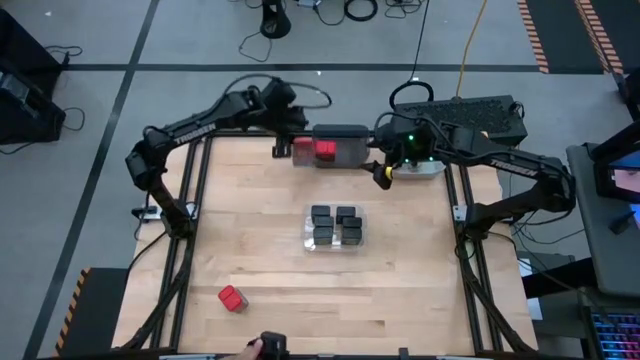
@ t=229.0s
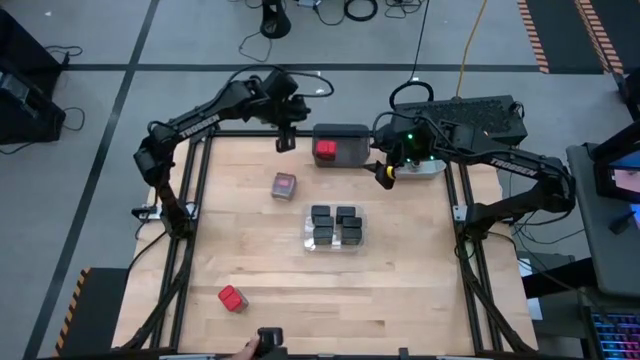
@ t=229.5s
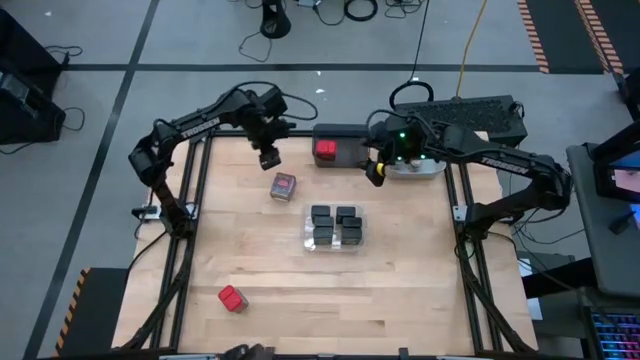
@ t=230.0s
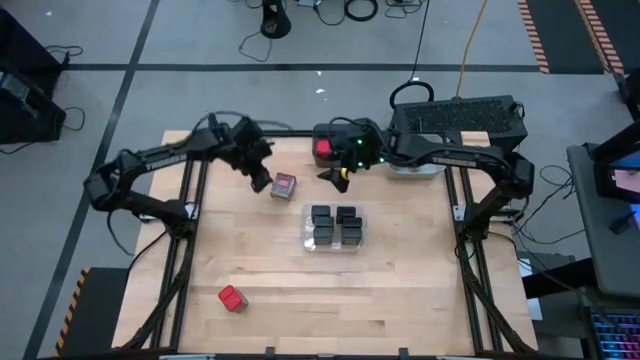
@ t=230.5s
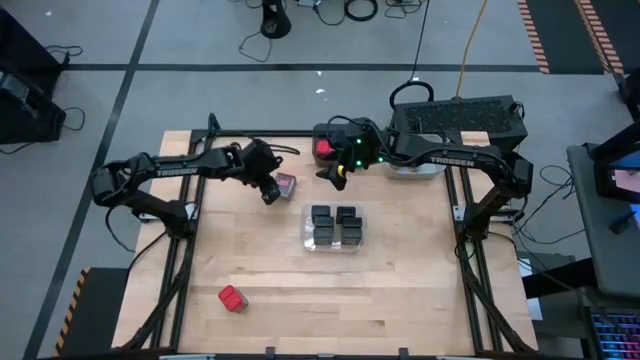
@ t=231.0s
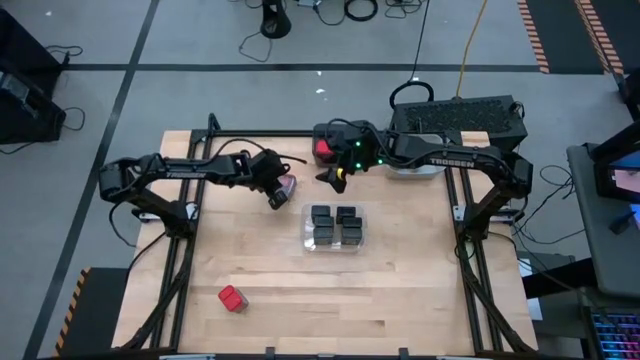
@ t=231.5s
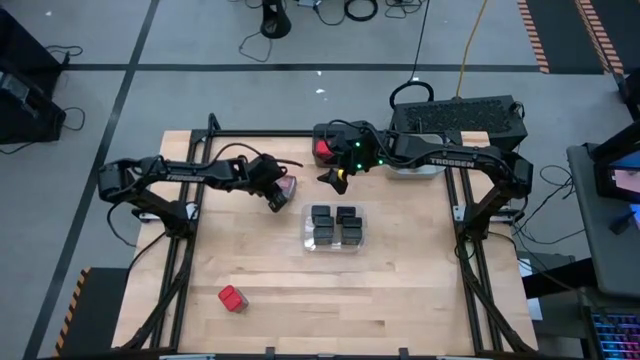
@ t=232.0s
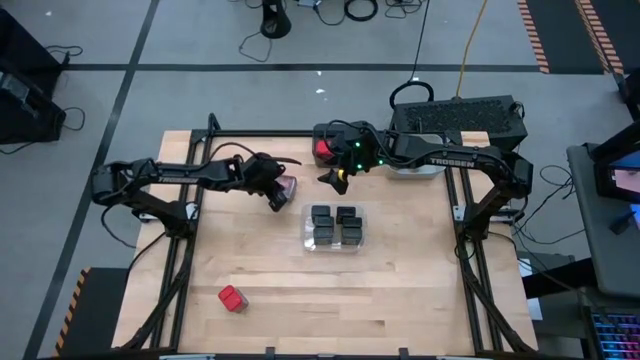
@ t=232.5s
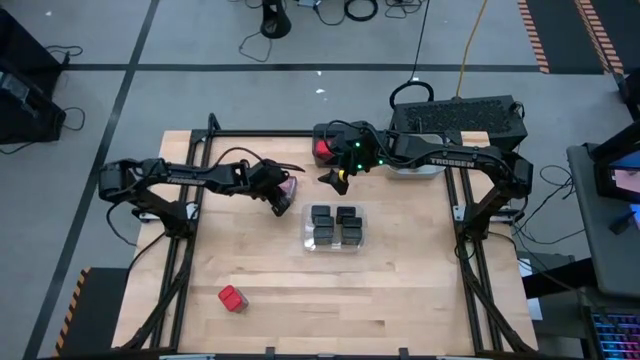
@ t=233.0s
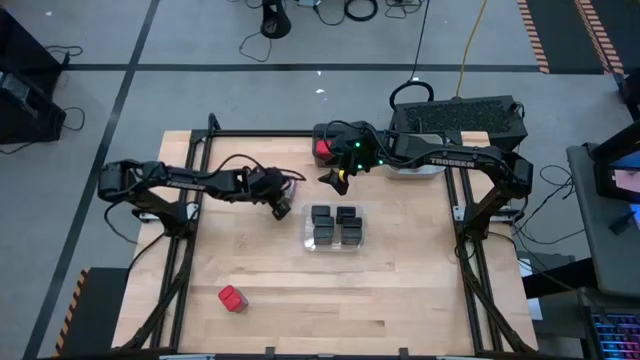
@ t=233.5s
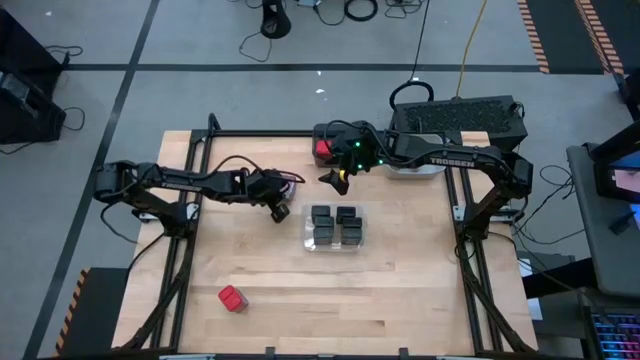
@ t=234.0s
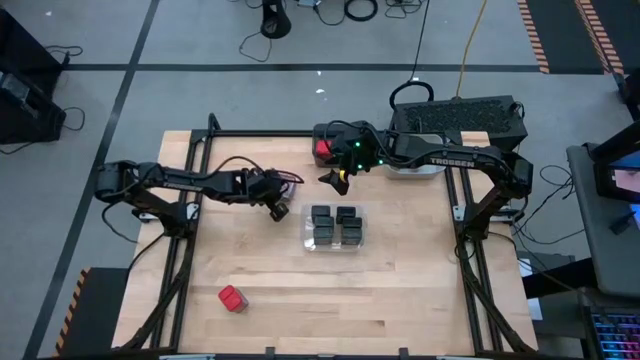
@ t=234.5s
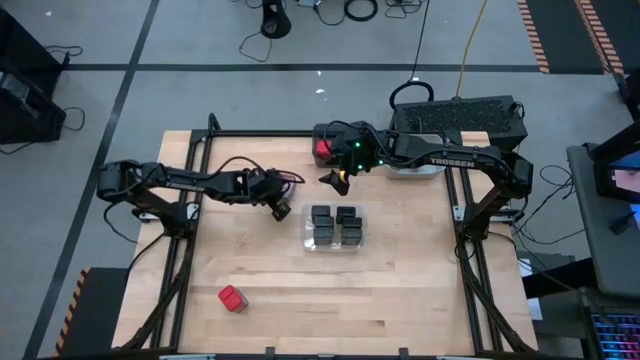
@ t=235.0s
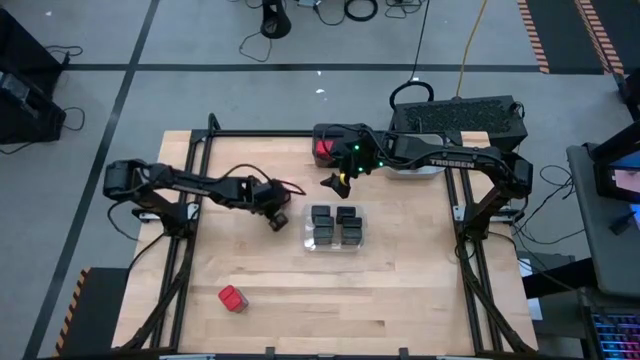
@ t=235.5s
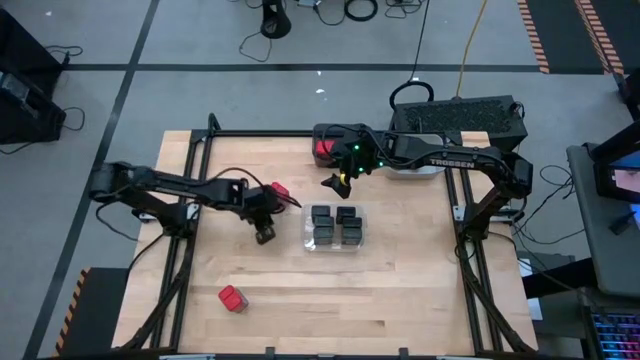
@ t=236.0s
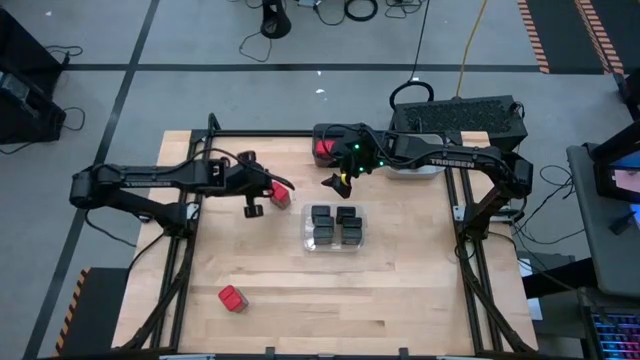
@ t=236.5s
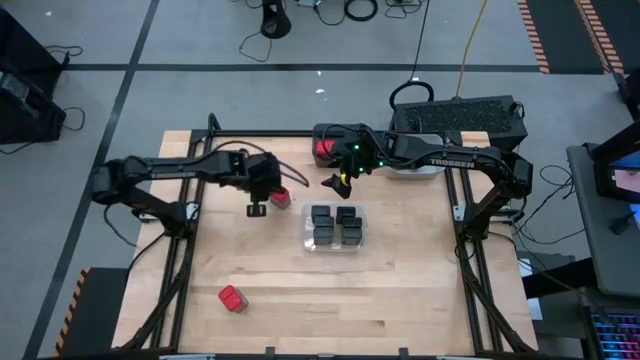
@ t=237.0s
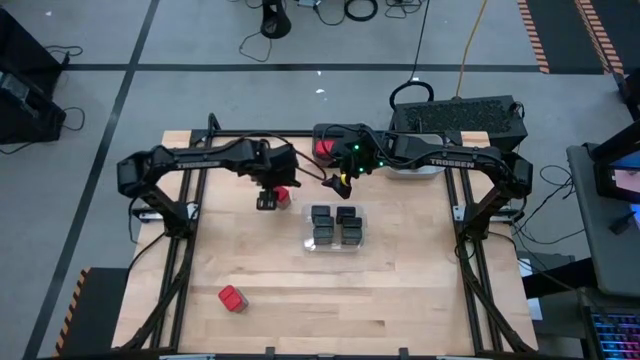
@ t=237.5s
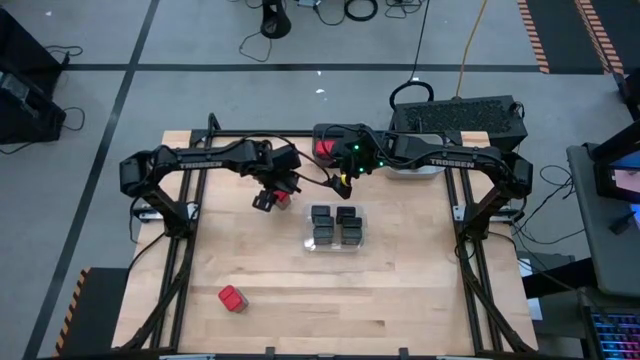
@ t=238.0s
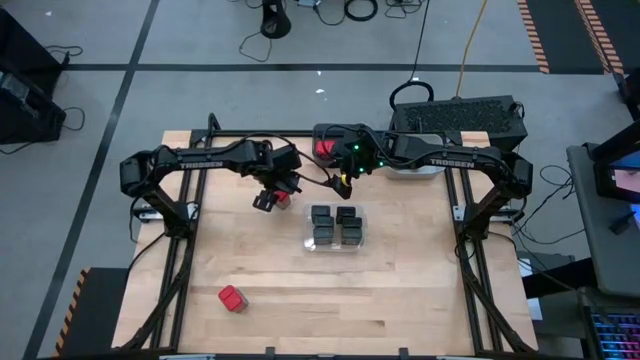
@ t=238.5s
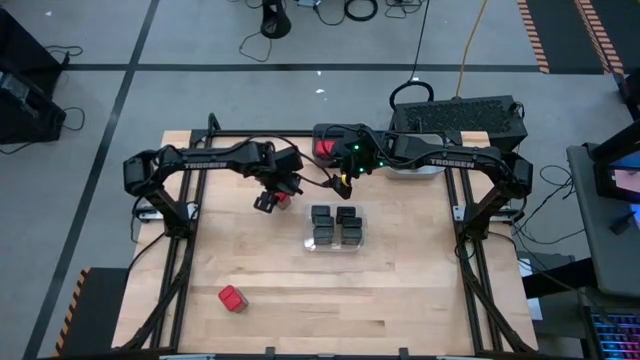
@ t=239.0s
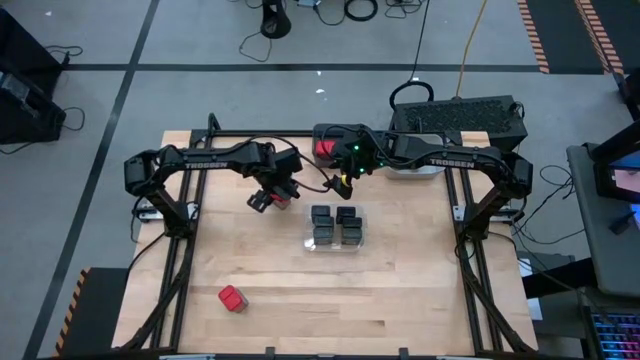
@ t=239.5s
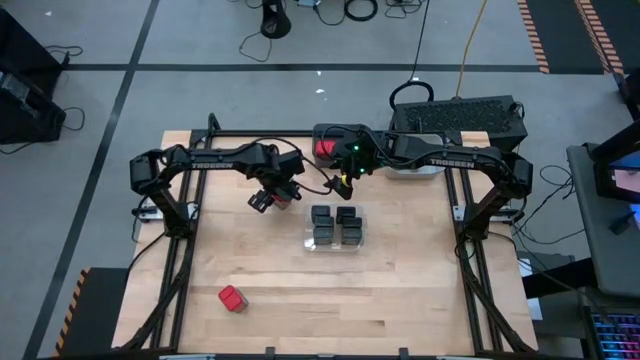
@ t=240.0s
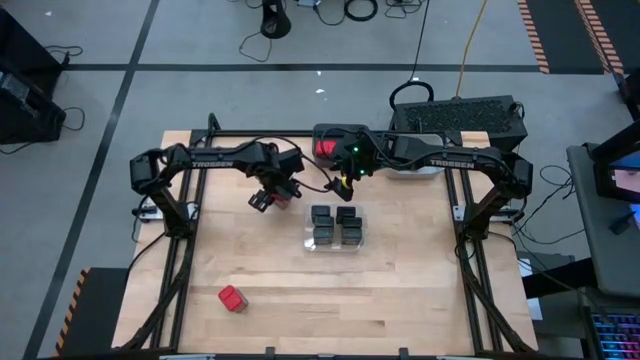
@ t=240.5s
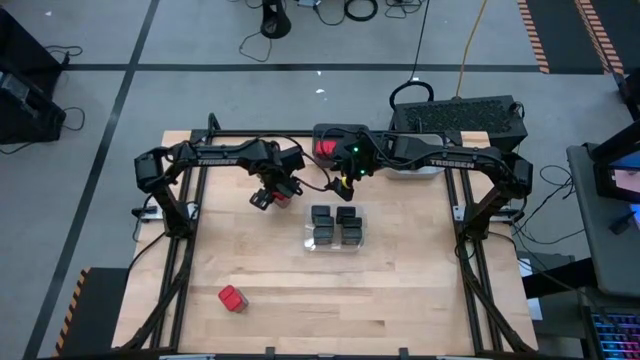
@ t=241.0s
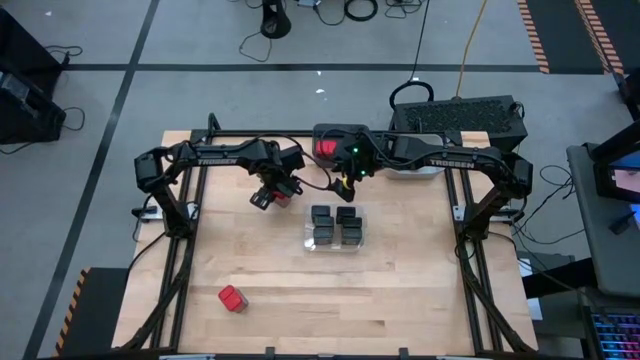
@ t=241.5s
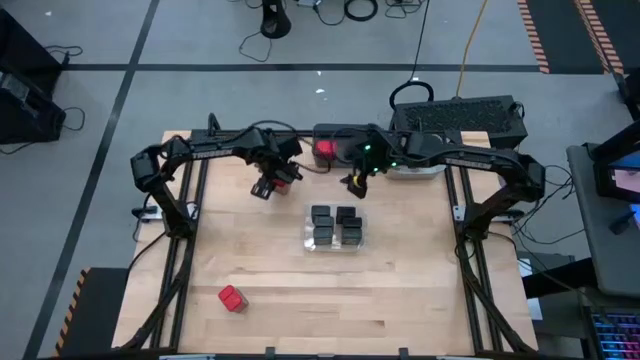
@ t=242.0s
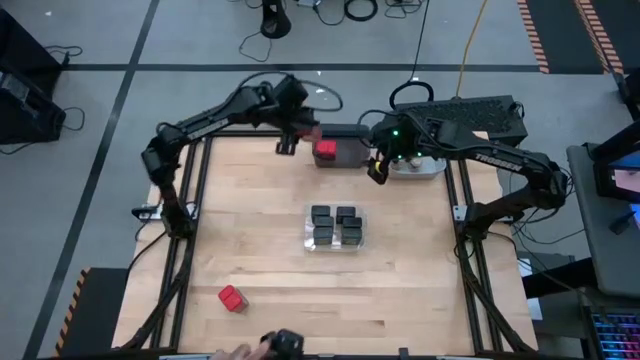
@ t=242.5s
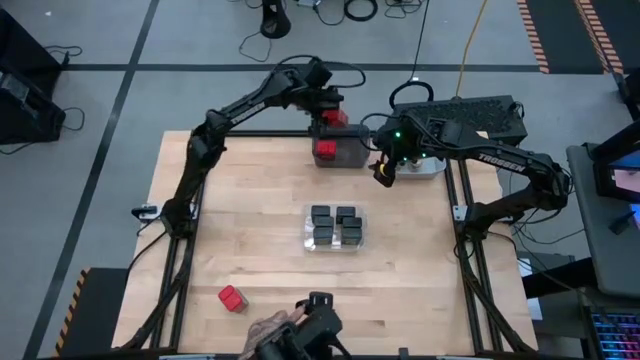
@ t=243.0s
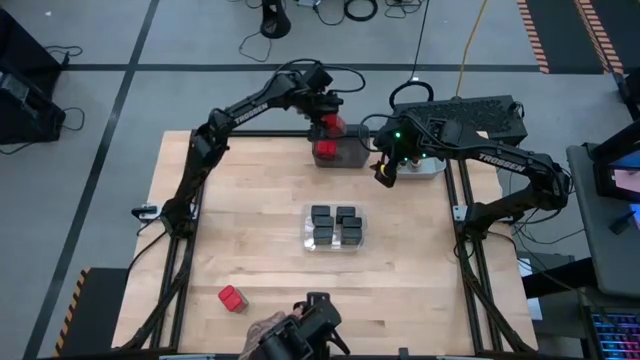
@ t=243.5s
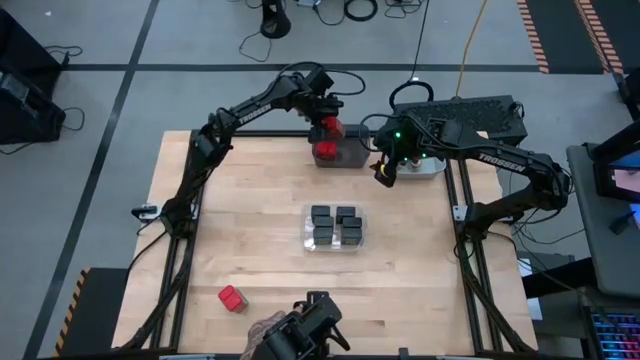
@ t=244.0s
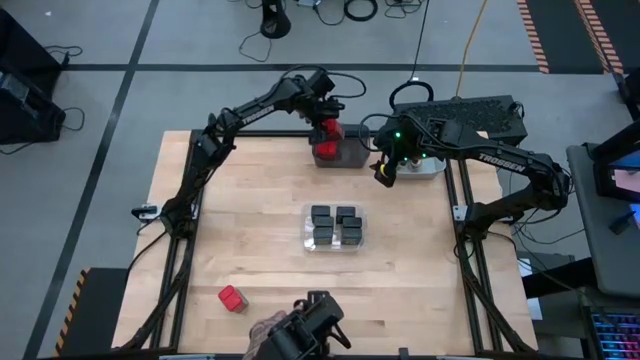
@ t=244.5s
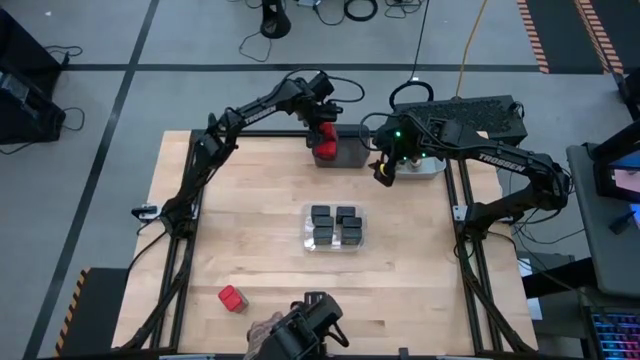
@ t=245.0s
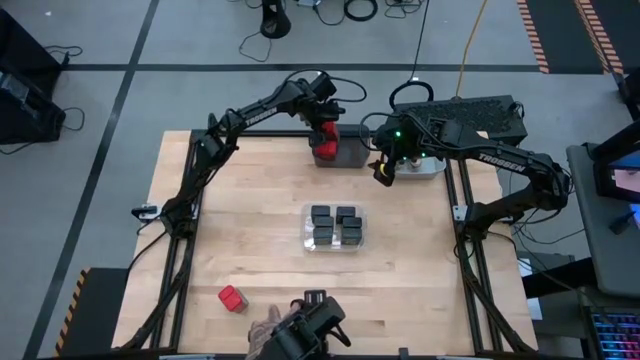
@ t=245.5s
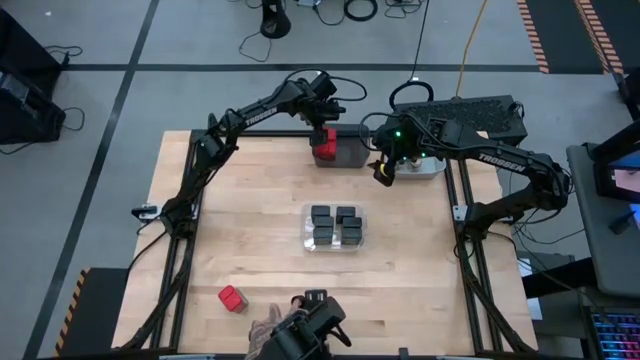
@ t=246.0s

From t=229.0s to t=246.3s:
Task: Sort spices by type
Put the red seasoning can into the black bin

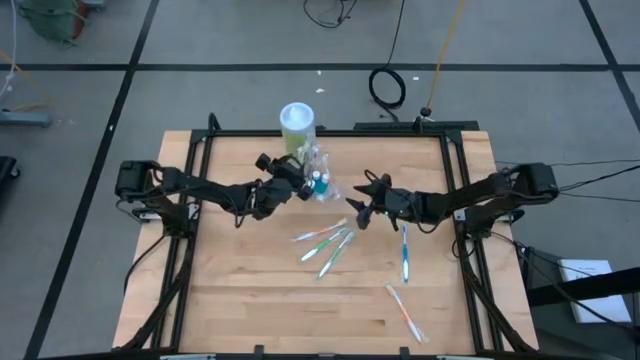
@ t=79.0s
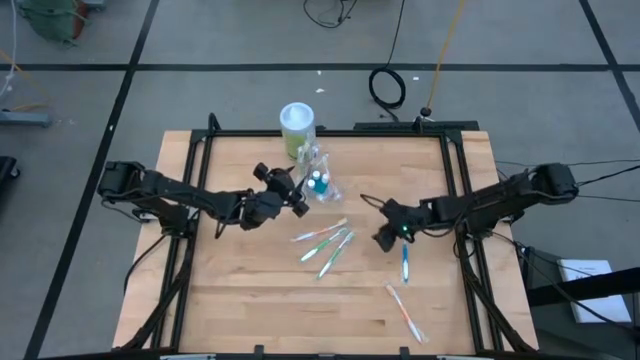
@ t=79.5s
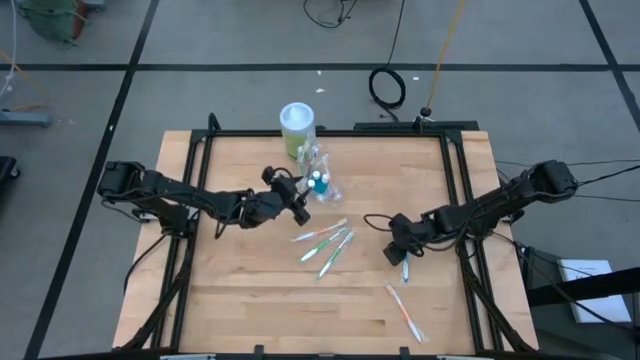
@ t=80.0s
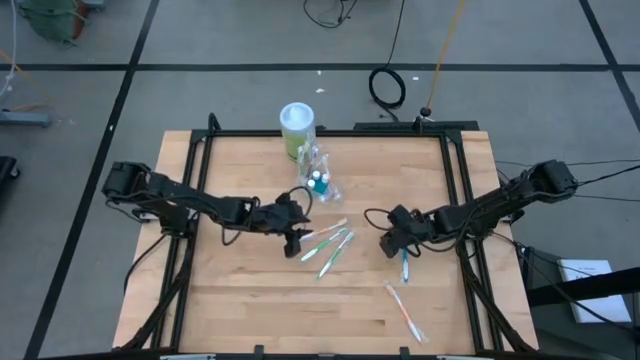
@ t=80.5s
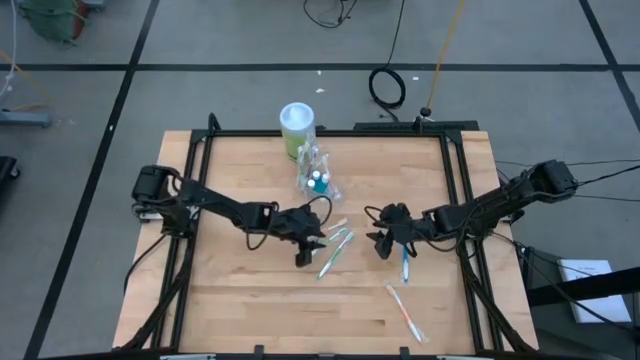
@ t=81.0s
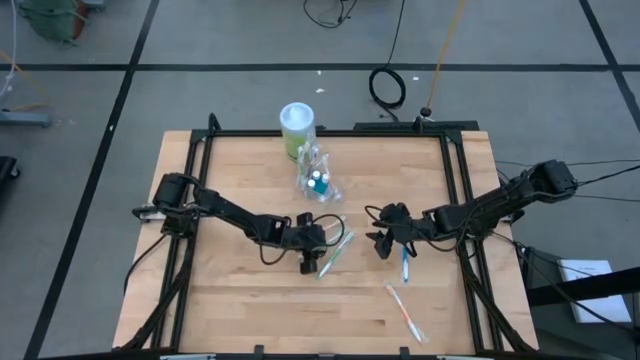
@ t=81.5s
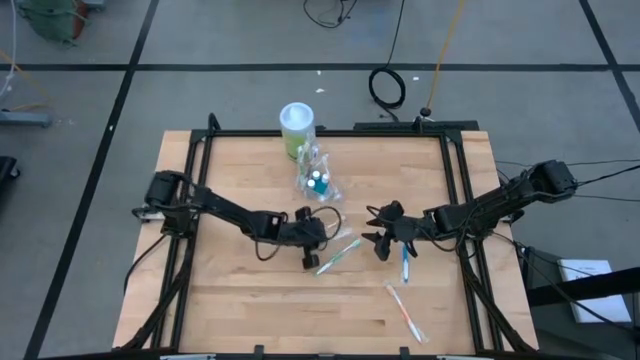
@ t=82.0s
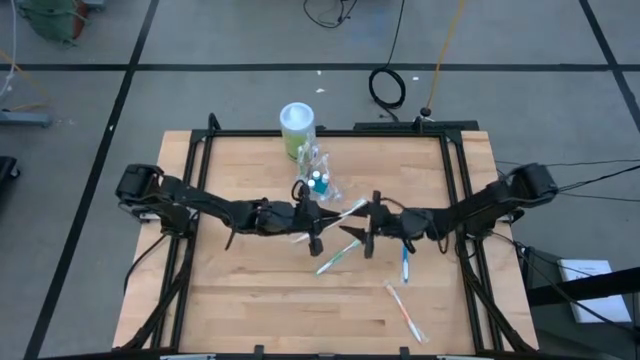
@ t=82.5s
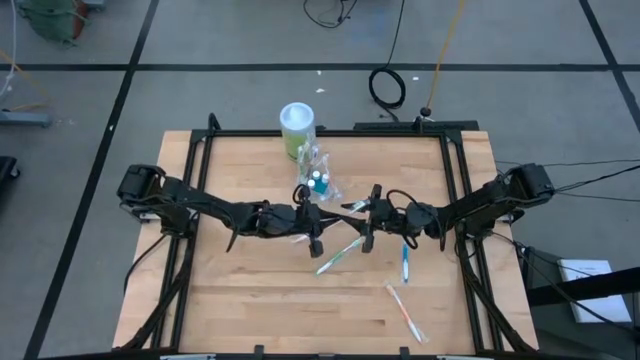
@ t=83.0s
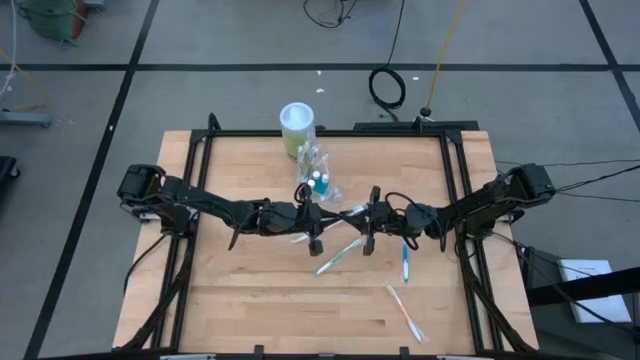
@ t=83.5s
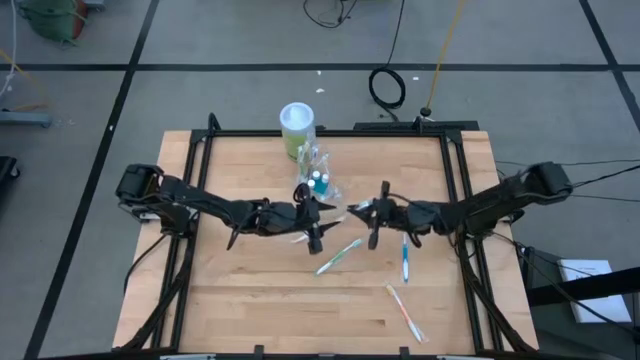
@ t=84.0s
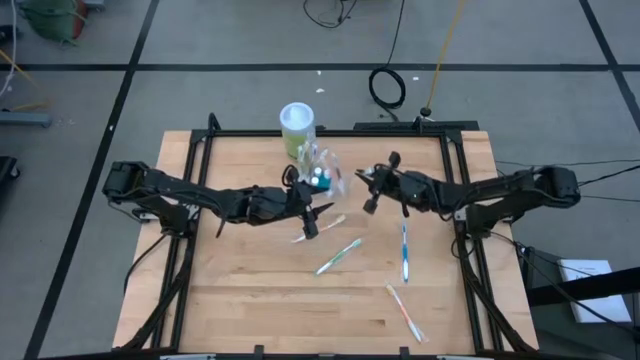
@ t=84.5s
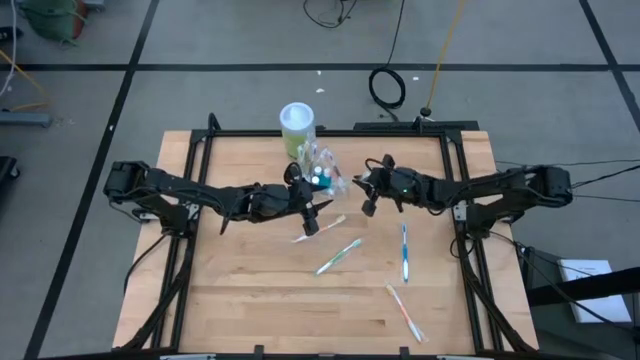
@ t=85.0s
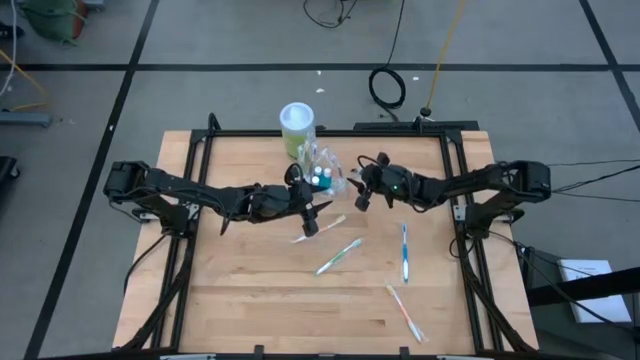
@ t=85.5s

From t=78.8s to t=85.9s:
Task: Pick & Place toothbrushing station
Put the green toothbrush into the right of the transparent organizer
